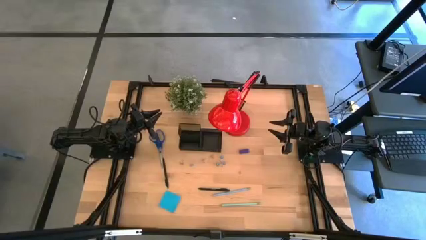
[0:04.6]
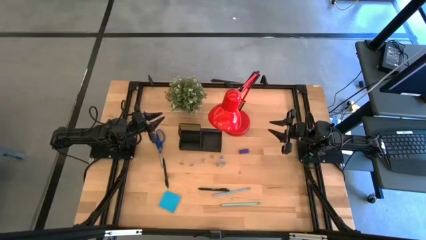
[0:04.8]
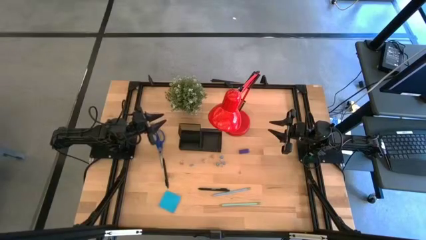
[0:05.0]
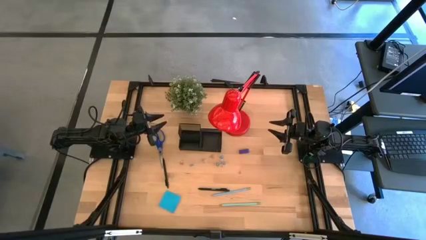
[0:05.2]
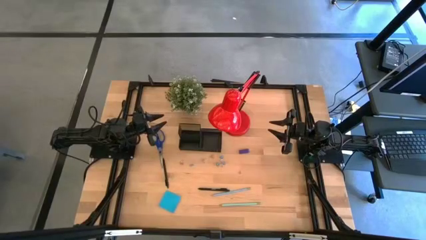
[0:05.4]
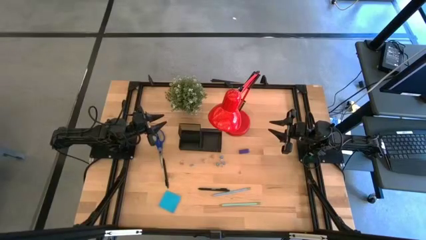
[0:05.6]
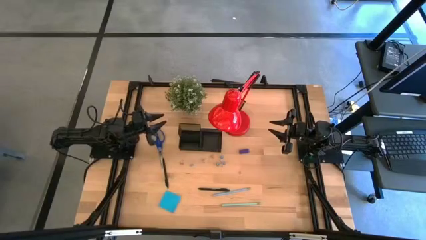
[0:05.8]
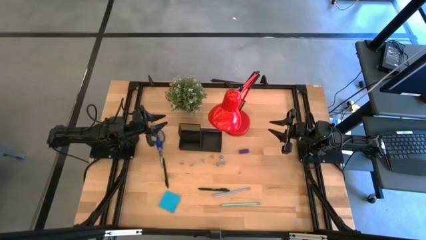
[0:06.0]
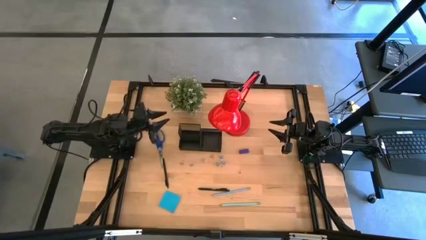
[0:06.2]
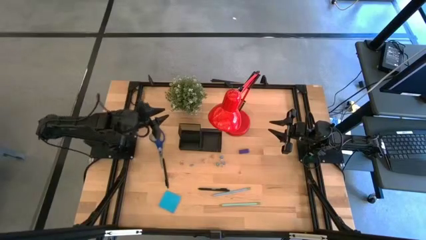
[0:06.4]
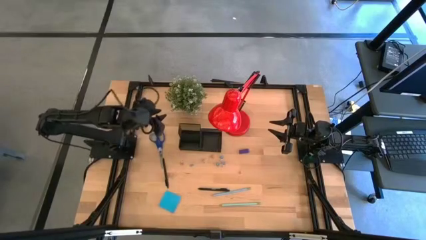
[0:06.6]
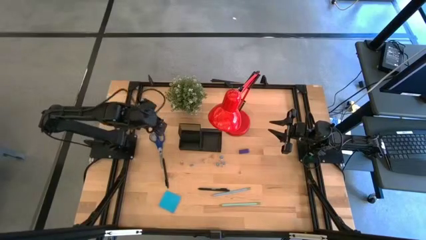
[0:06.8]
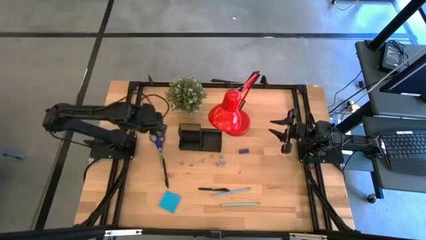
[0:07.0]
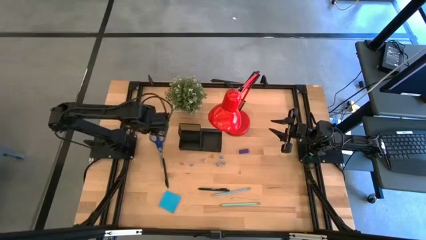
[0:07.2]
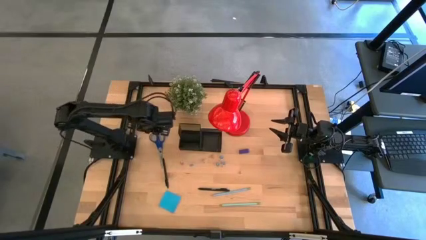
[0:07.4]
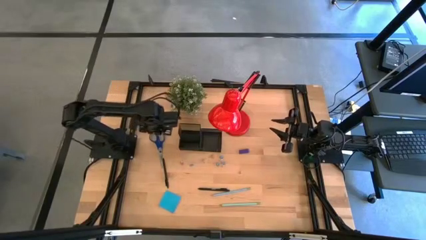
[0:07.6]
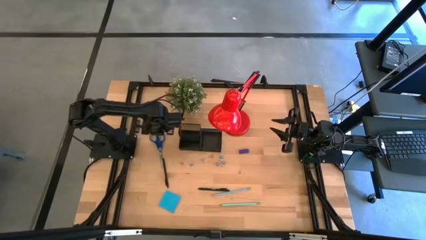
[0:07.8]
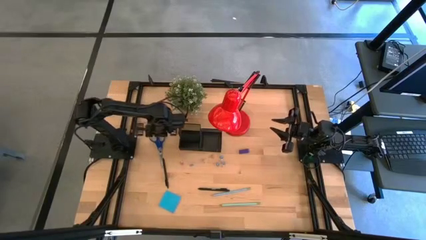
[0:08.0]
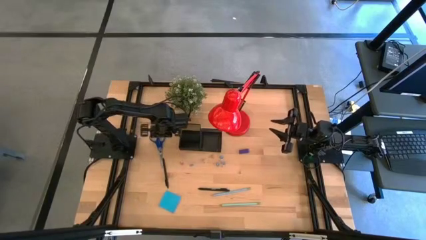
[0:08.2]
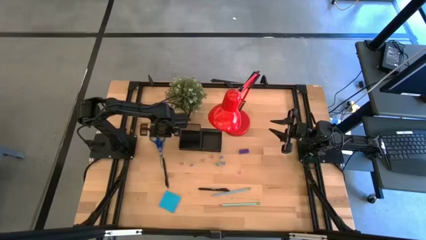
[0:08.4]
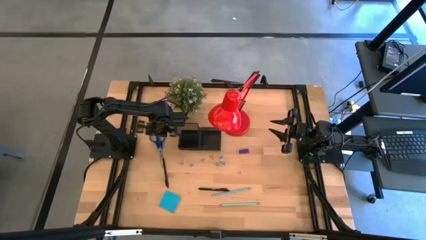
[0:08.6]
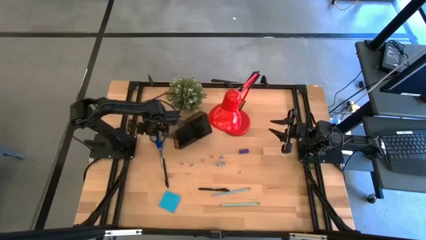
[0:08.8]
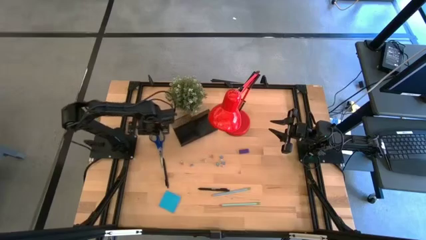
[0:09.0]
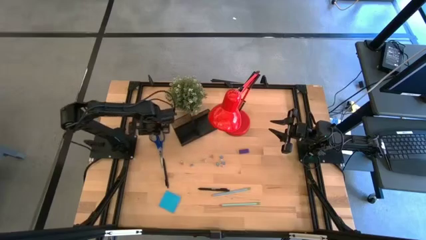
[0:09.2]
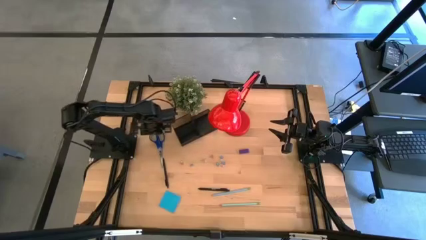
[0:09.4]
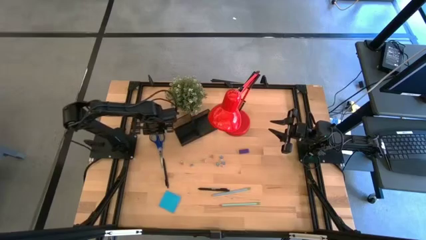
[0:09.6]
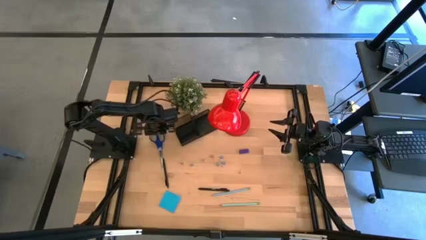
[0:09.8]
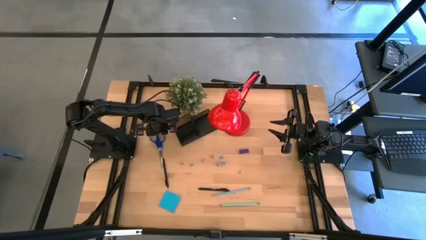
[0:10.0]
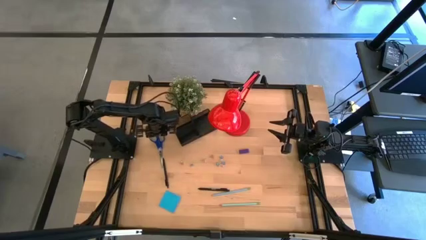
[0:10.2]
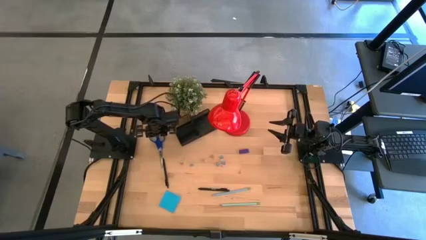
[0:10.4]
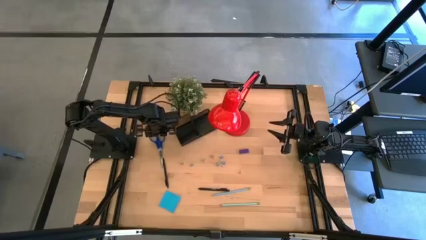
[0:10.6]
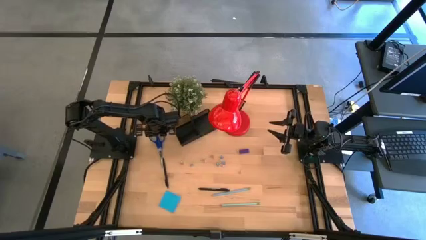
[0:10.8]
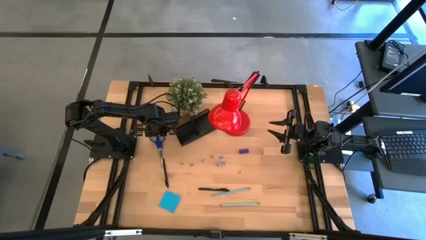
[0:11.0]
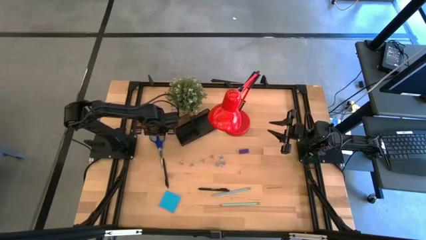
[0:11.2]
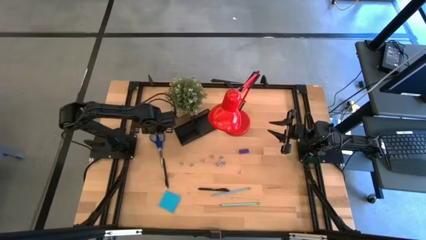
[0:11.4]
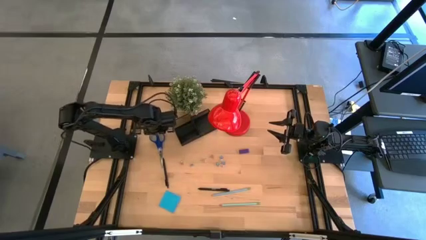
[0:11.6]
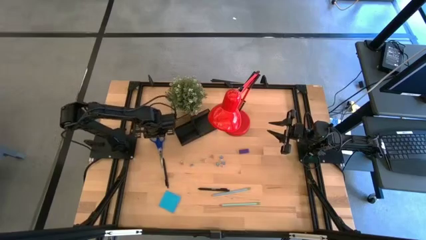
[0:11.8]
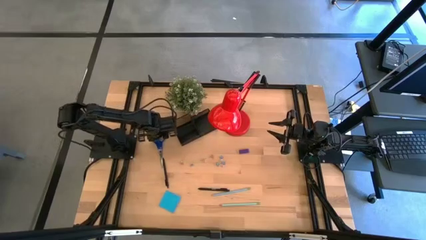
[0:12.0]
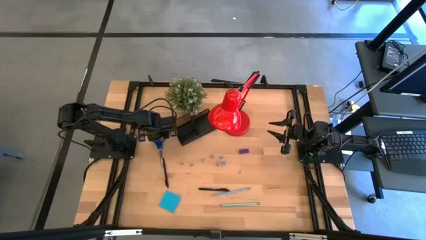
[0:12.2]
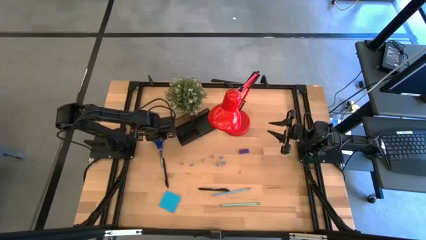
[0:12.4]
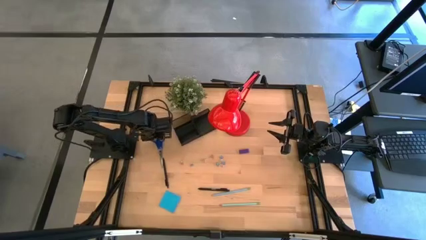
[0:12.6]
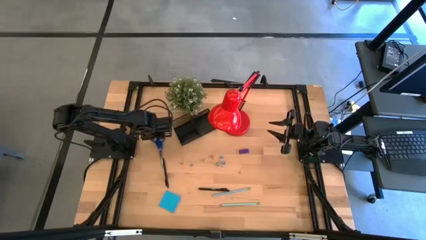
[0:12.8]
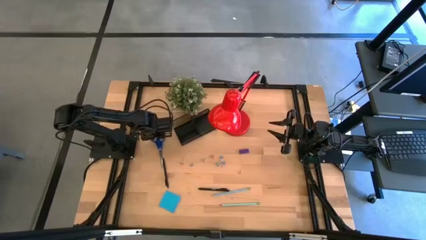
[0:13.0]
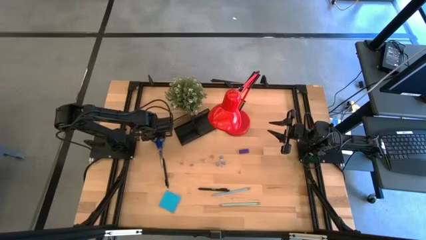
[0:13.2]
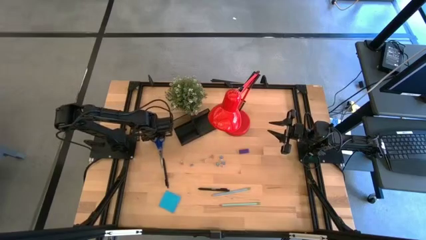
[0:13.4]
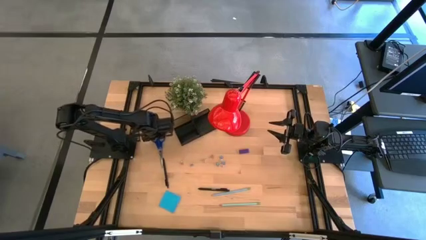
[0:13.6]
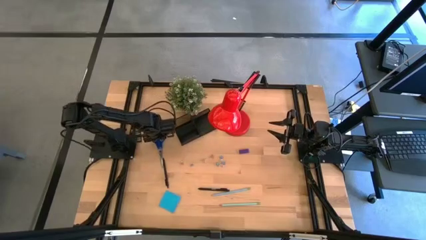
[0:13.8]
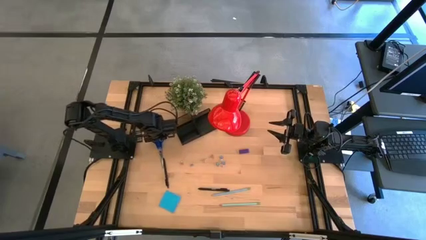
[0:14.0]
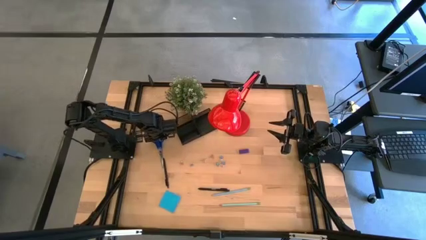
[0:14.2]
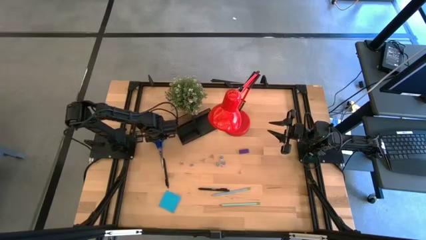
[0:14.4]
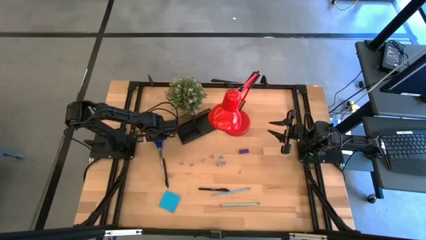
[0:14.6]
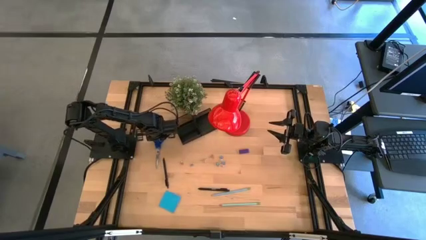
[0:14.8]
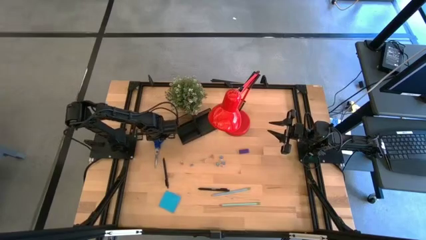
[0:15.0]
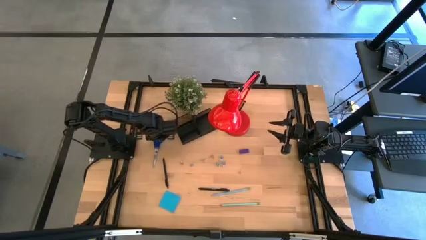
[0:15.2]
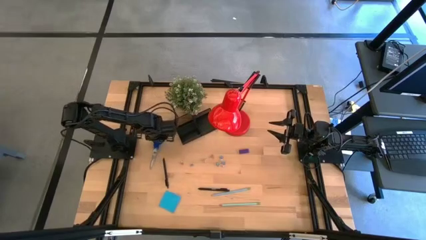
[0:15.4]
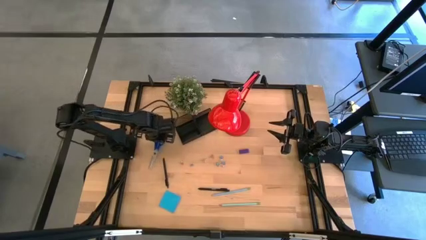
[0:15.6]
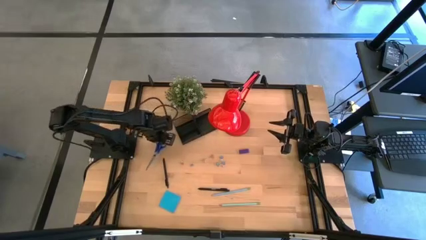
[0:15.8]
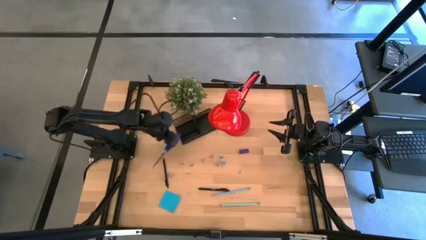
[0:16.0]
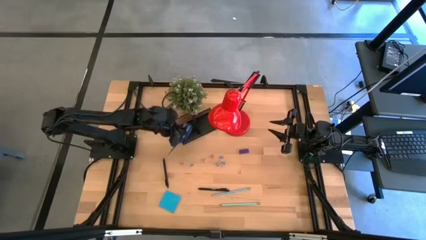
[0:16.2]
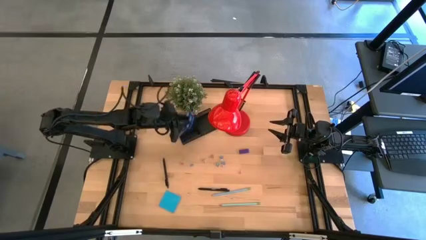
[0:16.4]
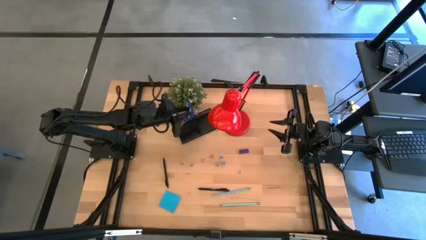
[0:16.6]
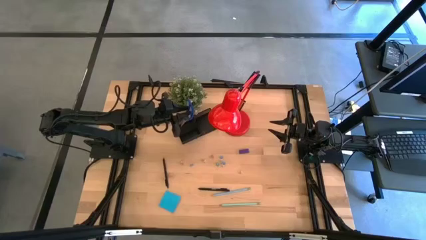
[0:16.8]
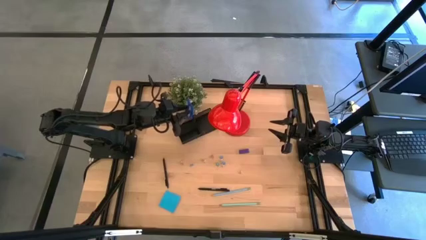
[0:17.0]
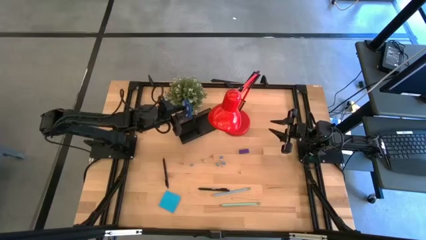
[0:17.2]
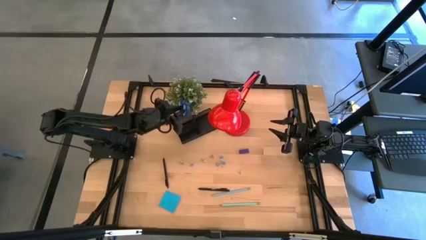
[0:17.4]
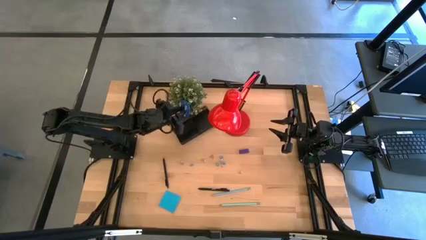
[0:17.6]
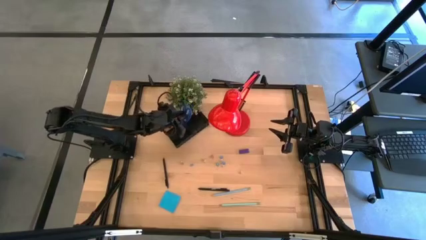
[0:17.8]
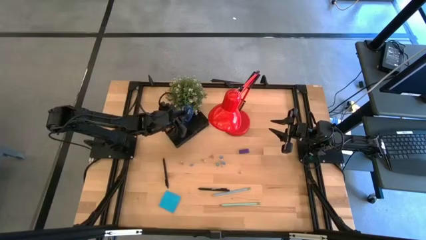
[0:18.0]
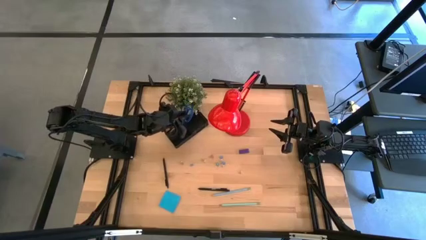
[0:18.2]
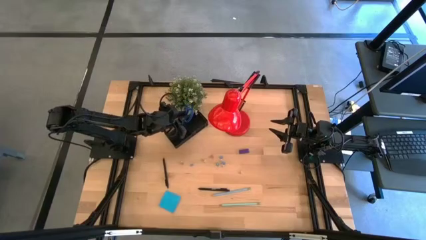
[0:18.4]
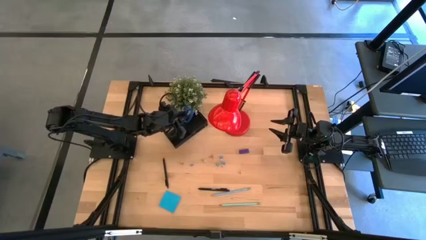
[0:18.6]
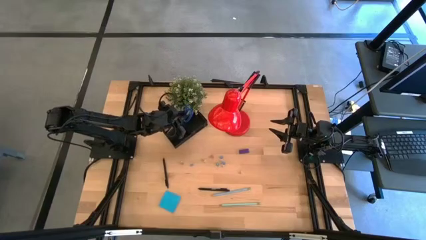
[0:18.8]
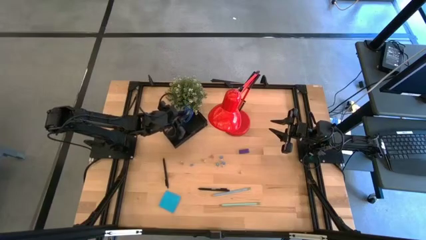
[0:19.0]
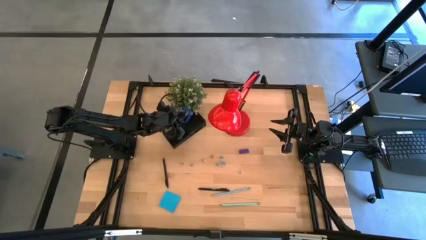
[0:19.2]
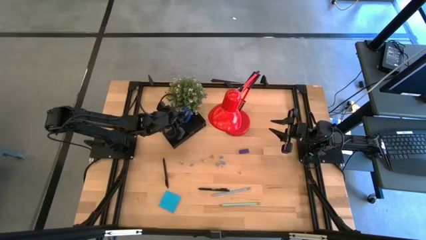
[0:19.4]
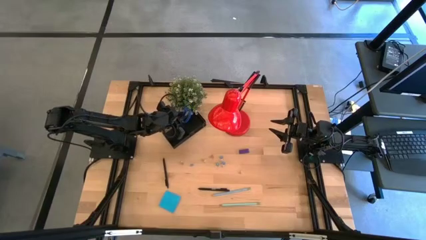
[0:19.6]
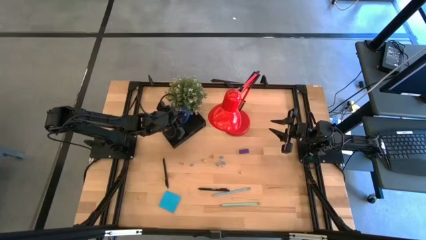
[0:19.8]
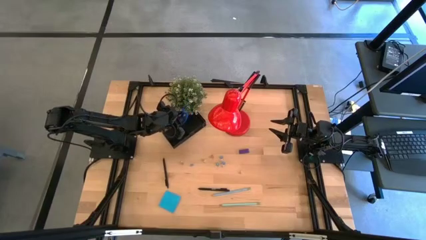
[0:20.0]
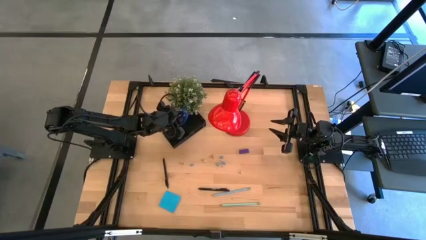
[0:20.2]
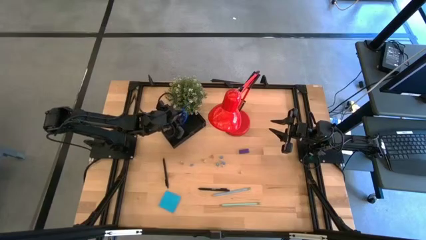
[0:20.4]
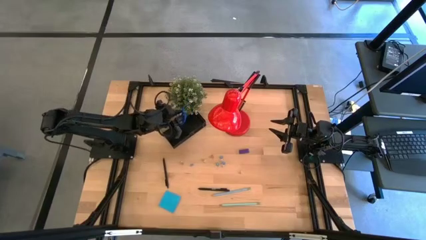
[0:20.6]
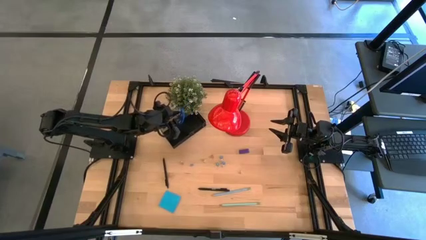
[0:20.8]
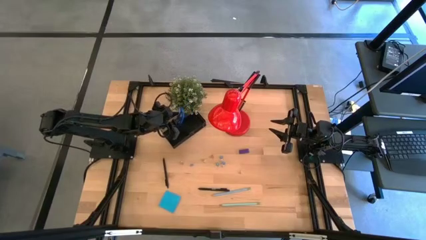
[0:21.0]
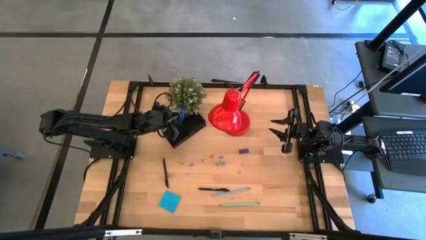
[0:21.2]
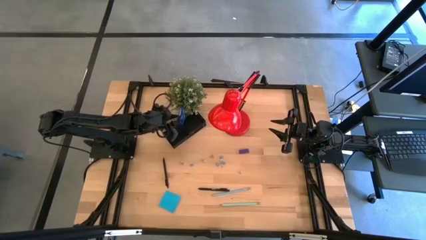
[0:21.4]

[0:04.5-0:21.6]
Task: Pick and place office supplies into organizer
Put the blue scissor into the black desk organizer
